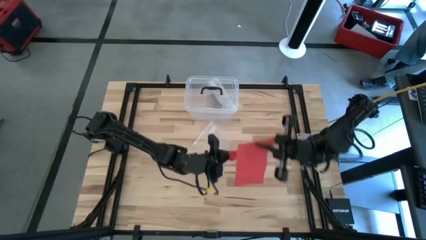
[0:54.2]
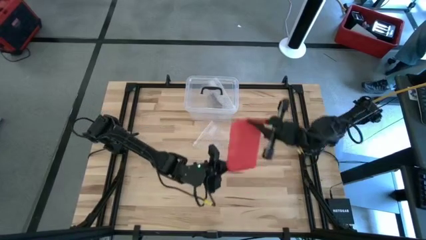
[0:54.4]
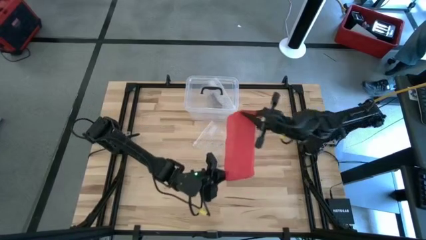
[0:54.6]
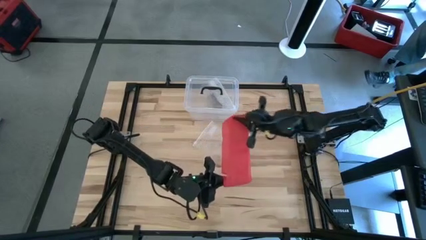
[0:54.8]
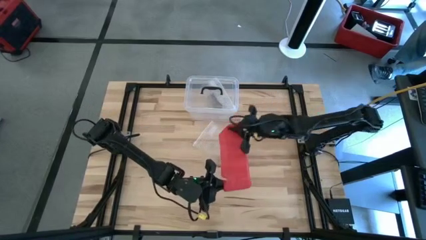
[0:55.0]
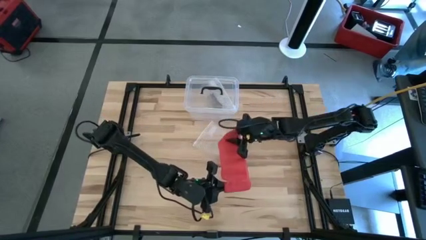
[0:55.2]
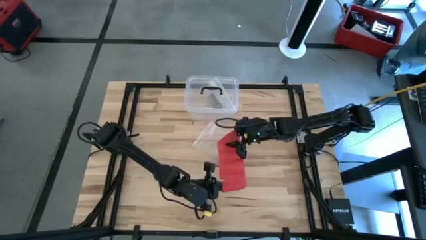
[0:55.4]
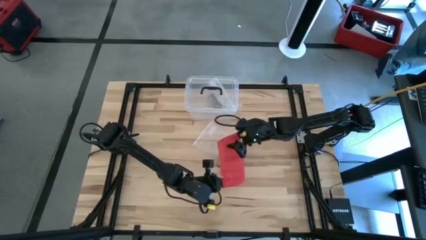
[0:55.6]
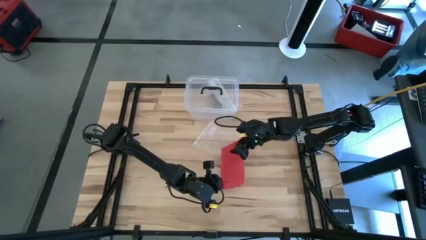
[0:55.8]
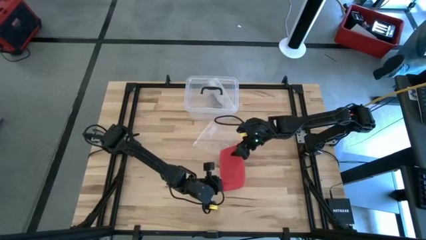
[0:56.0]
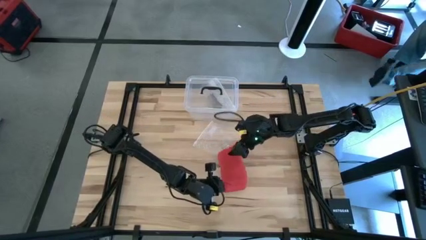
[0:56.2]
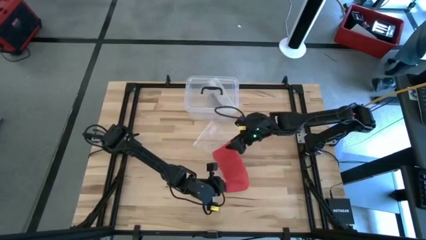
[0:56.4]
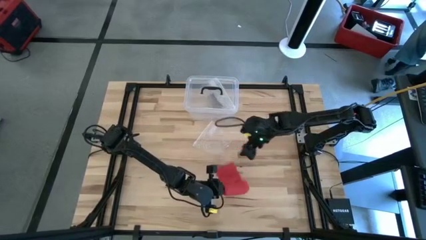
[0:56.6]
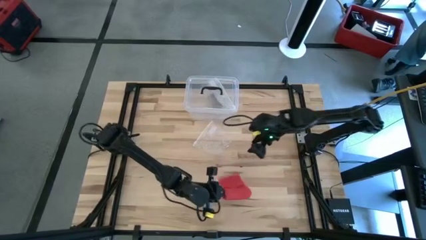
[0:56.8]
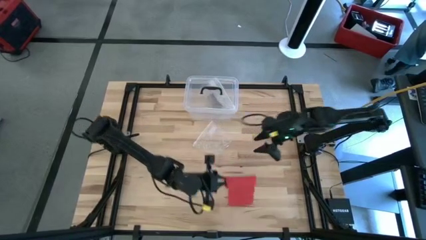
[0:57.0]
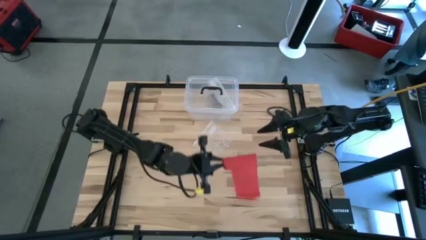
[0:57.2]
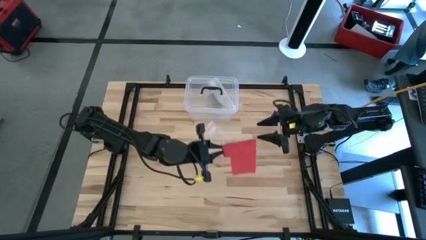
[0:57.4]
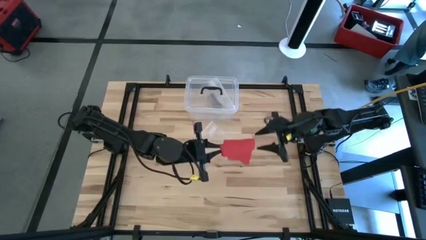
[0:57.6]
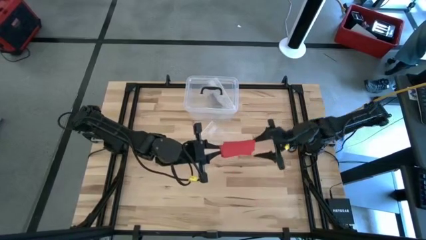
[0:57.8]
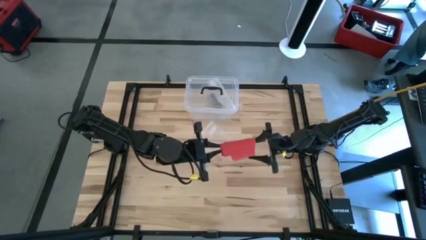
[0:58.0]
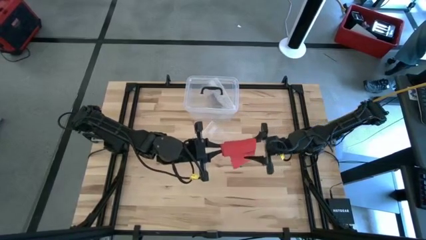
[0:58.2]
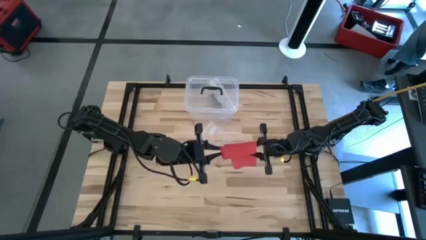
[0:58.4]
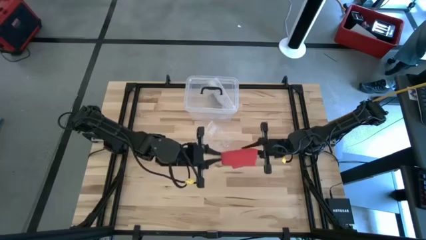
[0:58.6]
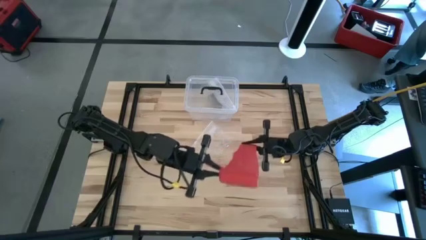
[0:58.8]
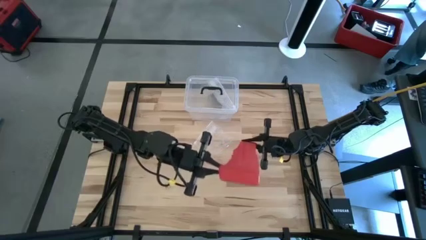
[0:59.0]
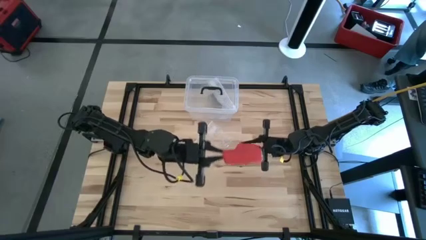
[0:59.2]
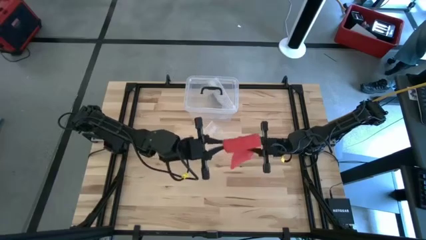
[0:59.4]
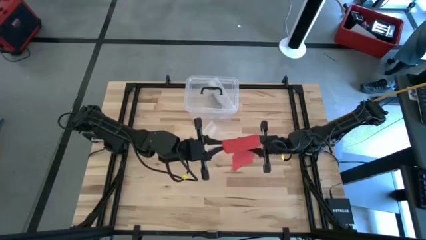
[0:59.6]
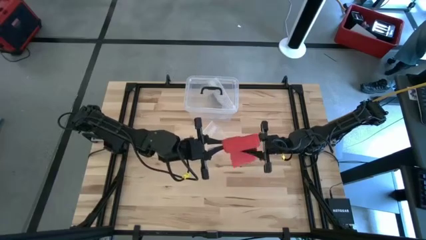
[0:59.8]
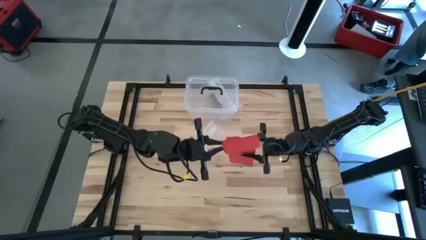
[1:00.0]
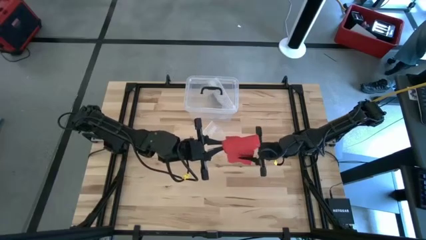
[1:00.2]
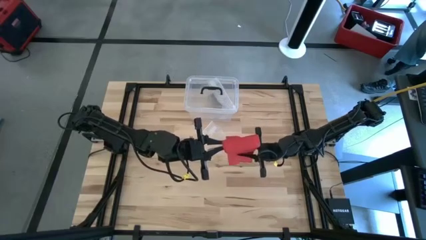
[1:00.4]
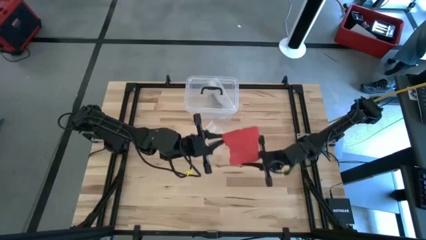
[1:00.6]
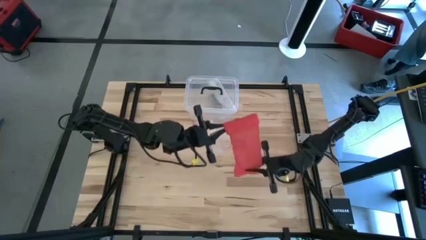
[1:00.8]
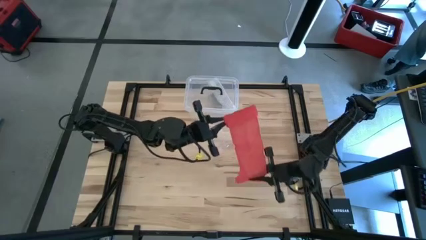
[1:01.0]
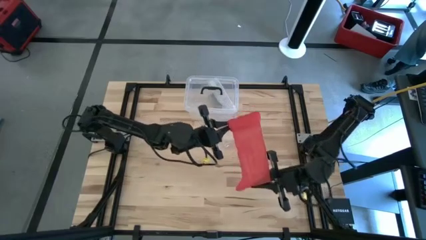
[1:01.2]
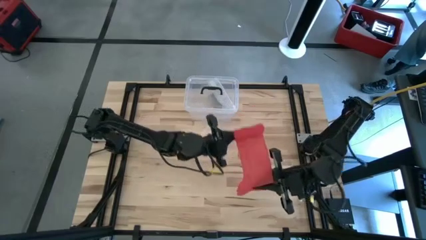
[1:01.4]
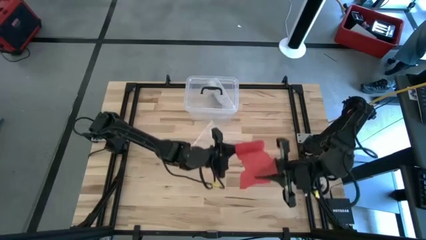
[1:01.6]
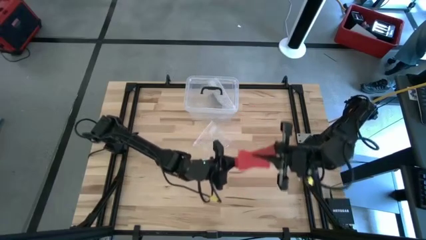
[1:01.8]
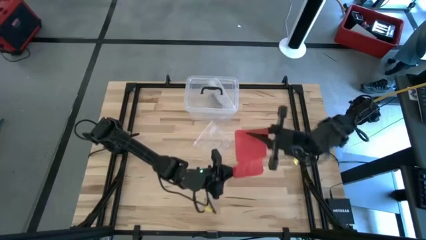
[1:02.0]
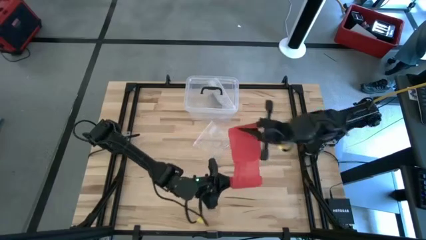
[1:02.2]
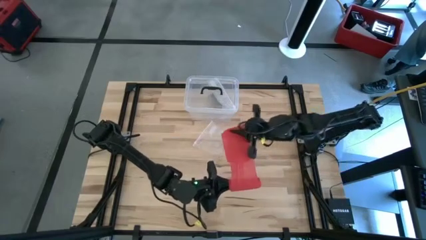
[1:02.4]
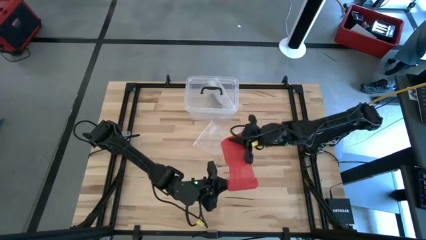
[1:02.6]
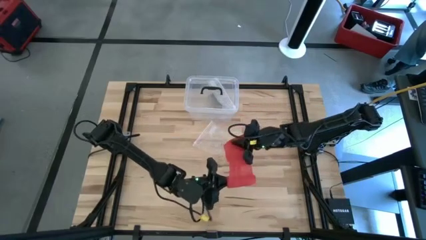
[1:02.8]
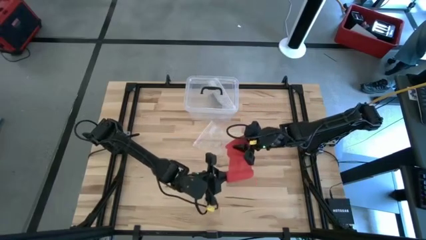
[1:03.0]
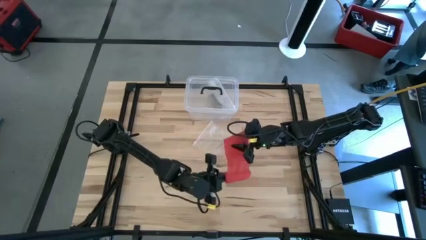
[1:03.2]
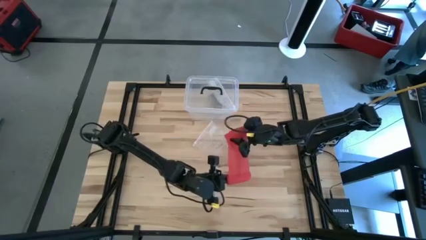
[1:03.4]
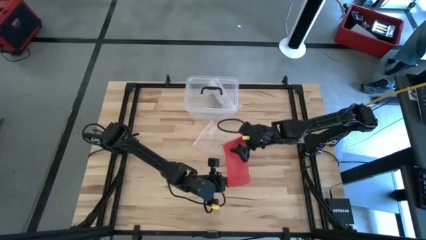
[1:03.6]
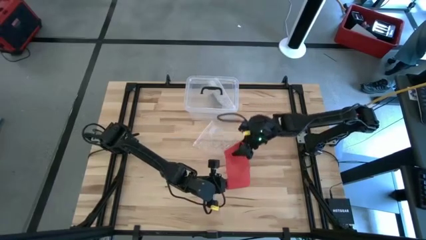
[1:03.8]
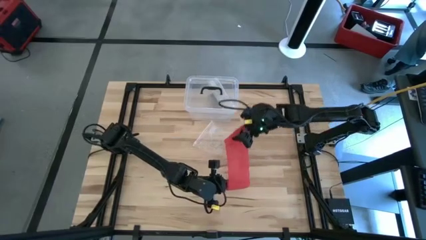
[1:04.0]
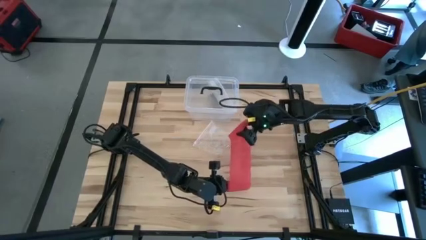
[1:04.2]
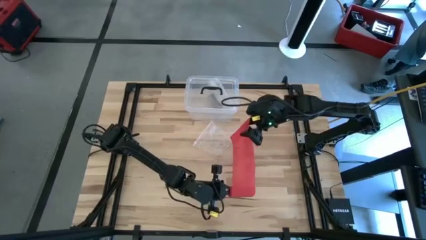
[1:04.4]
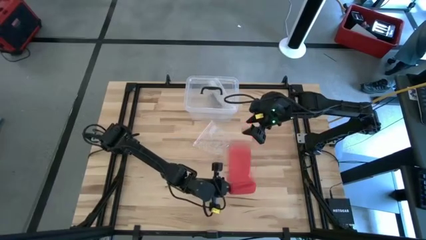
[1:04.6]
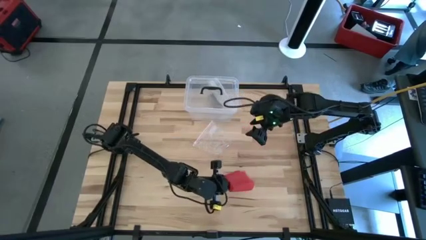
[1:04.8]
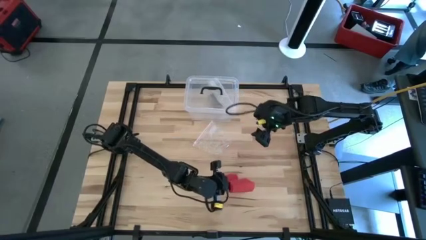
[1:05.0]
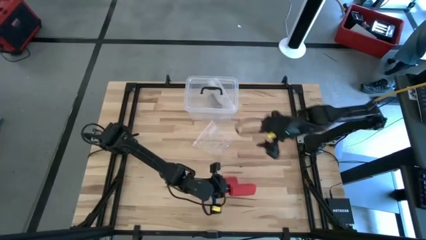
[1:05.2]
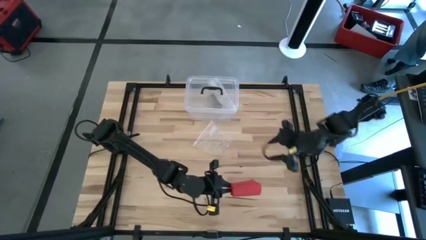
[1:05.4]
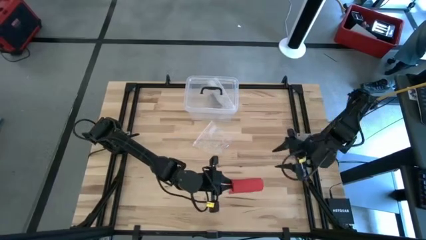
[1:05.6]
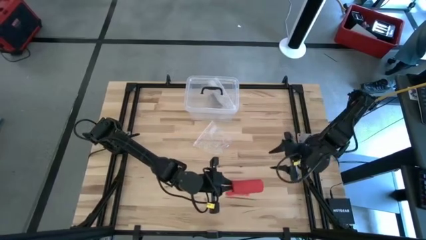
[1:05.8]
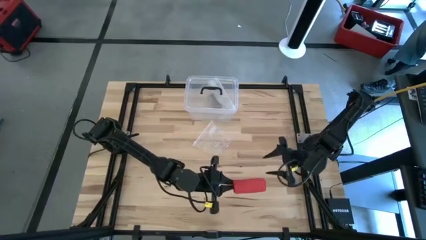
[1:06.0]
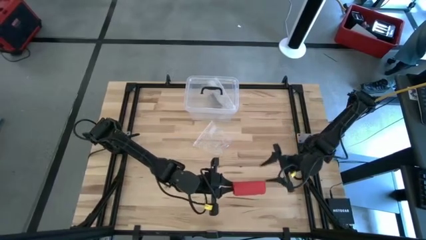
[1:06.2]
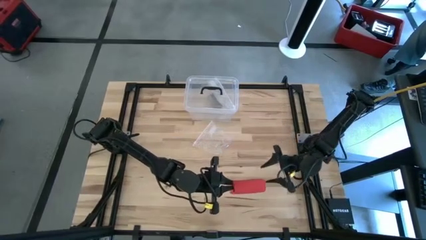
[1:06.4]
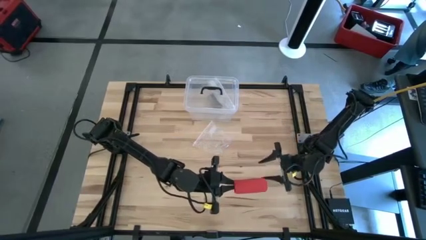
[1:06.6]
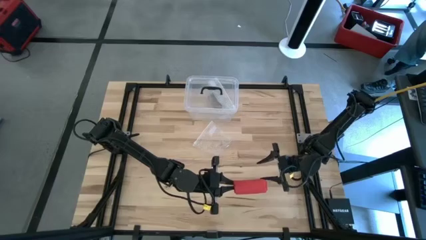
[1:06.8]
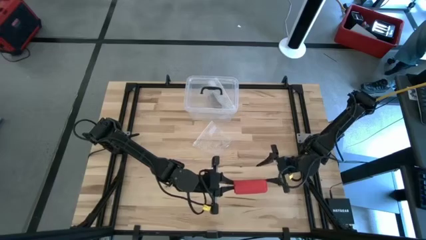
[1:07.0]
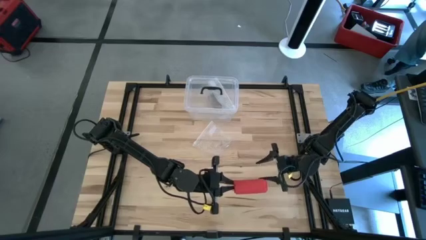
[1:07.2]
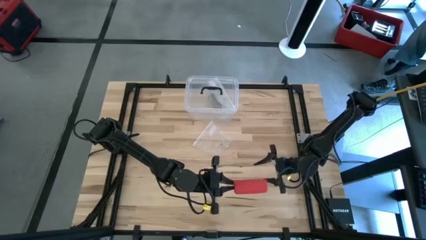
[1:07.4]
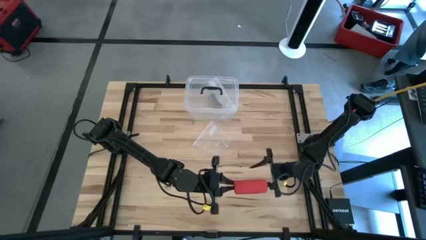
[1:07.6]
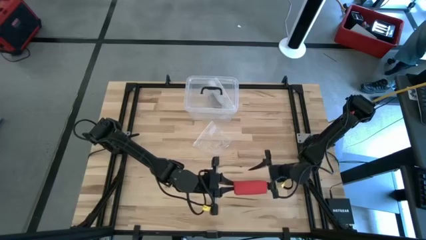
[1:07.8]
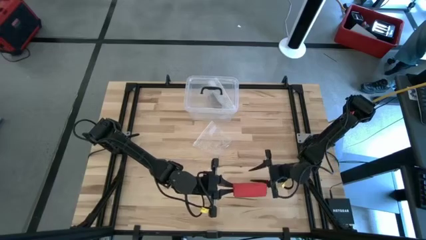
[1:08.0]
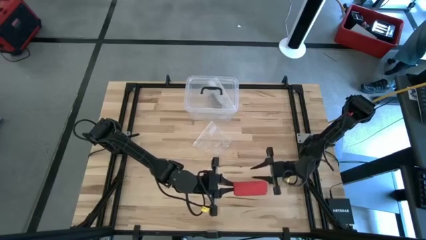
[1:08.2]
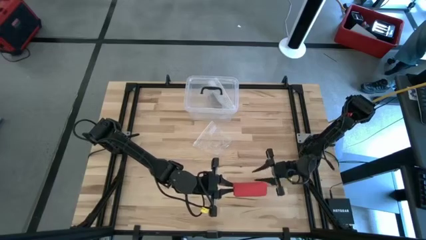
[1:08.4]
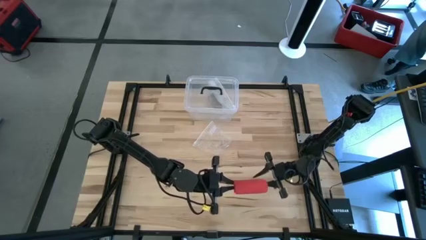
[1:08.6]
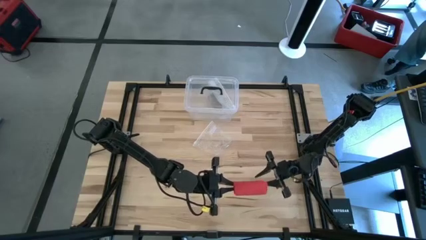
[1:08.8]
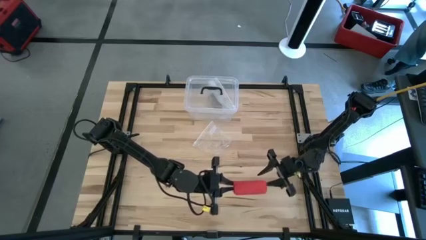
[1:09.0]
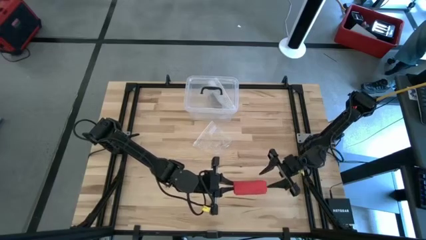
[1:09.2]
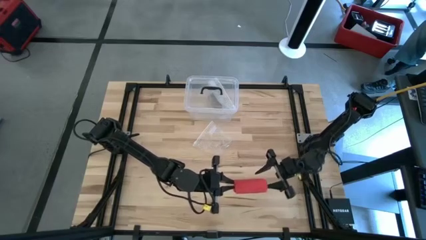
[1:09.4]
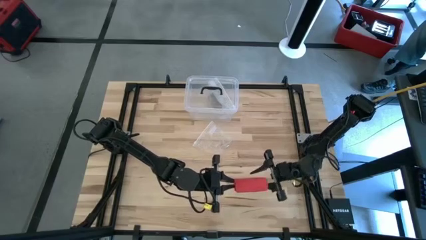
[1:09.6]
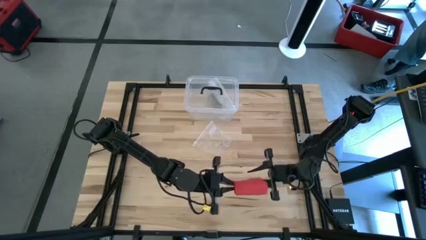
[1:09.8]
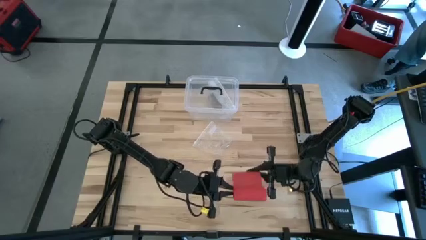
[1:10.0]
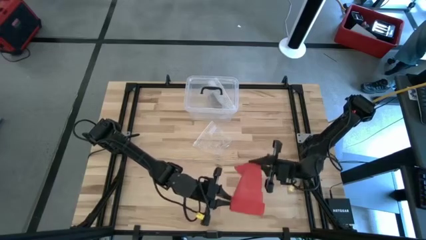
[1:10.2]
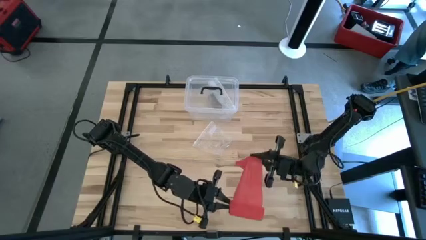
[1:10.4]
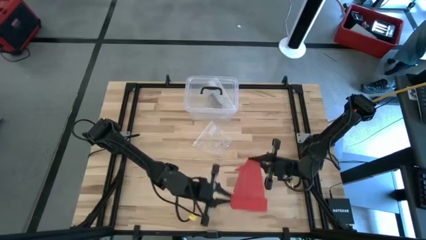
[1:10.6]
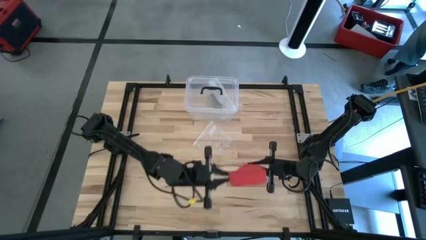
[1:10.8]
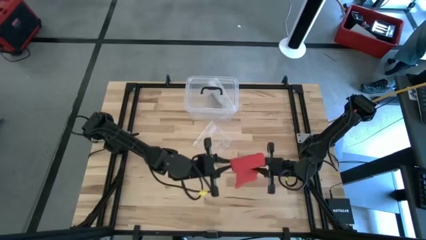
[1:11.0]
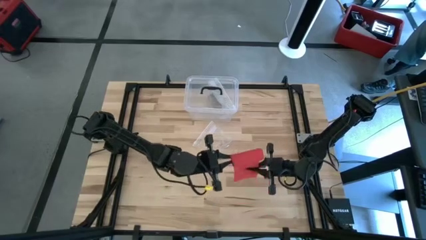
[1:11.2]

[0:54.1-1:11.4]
Task: Roll bandage
Roll the red bandage
